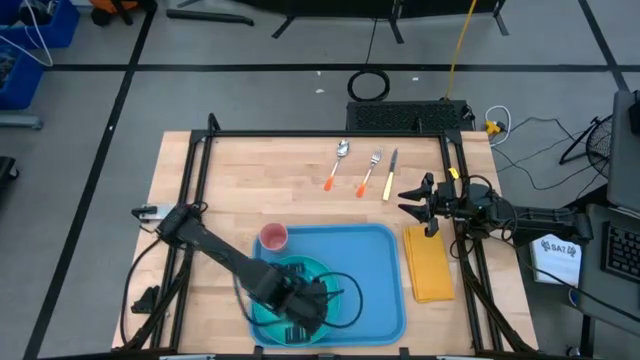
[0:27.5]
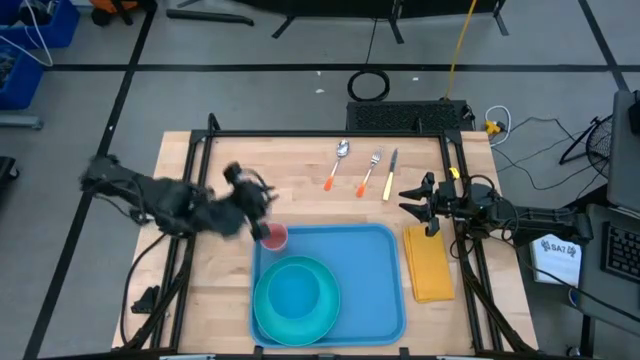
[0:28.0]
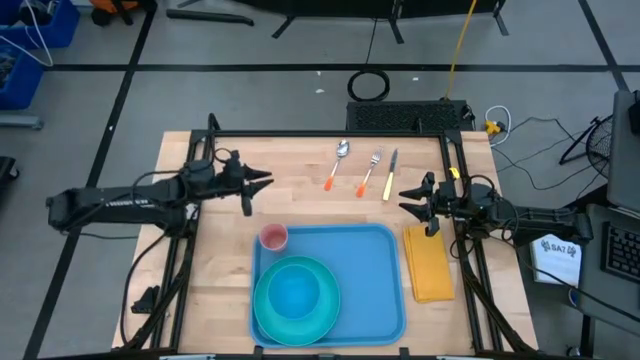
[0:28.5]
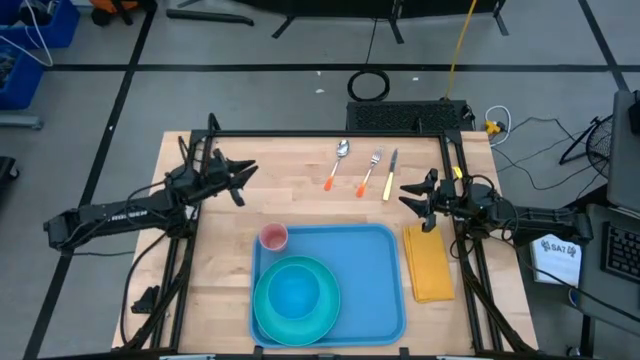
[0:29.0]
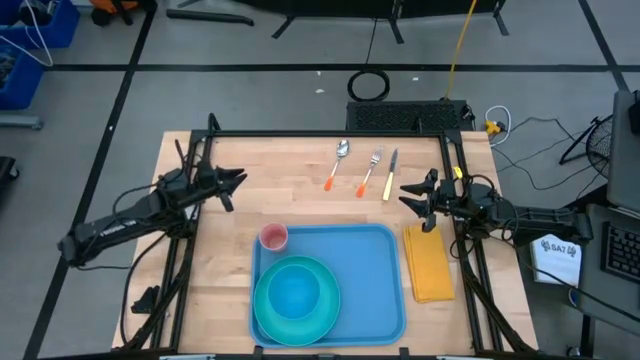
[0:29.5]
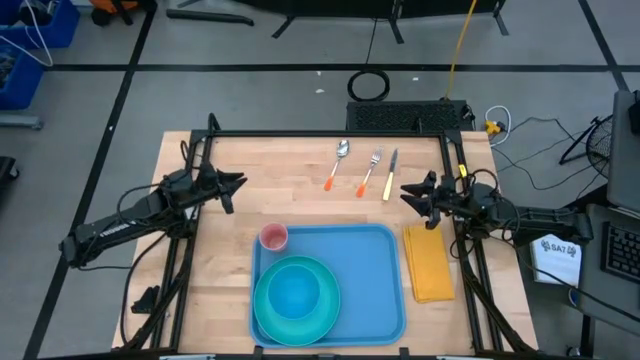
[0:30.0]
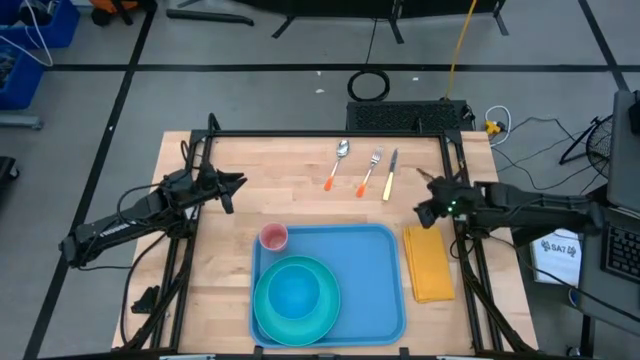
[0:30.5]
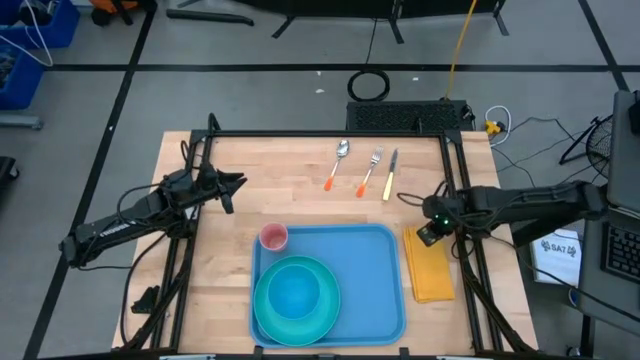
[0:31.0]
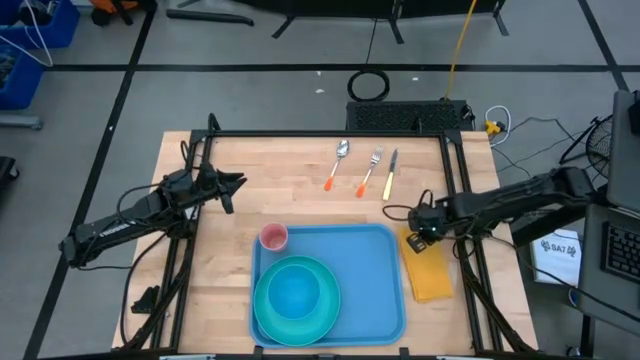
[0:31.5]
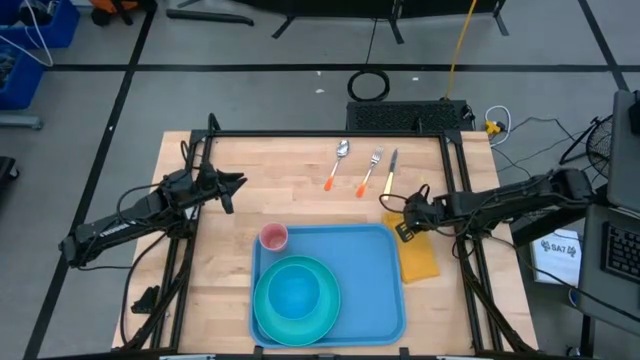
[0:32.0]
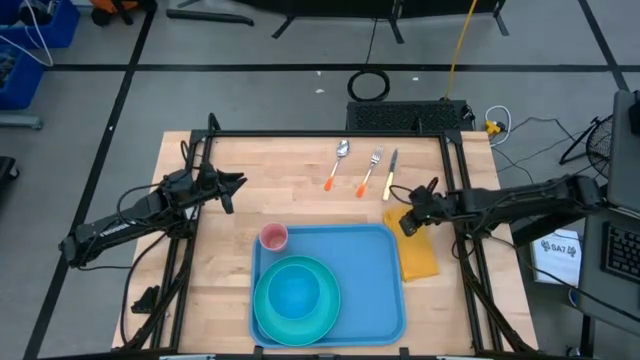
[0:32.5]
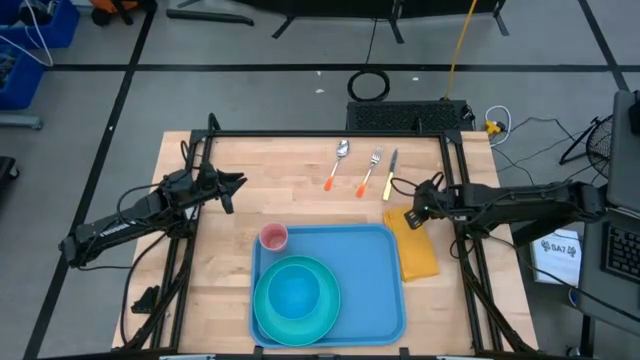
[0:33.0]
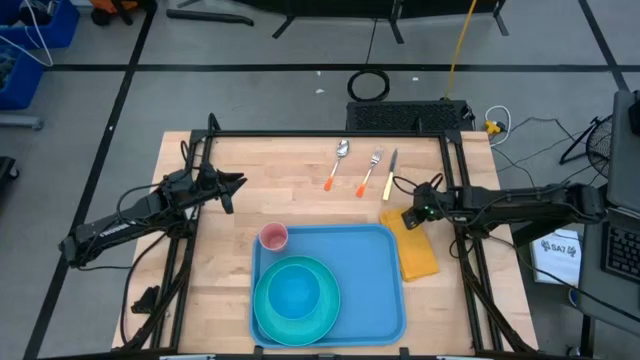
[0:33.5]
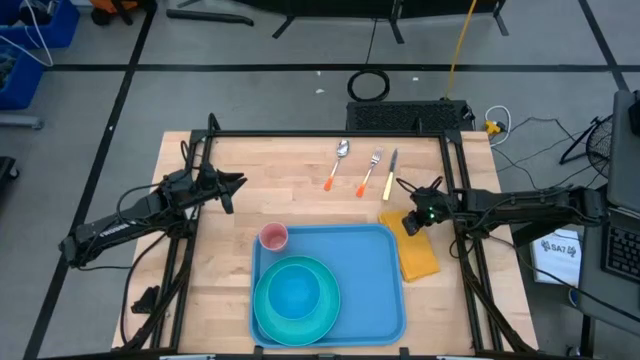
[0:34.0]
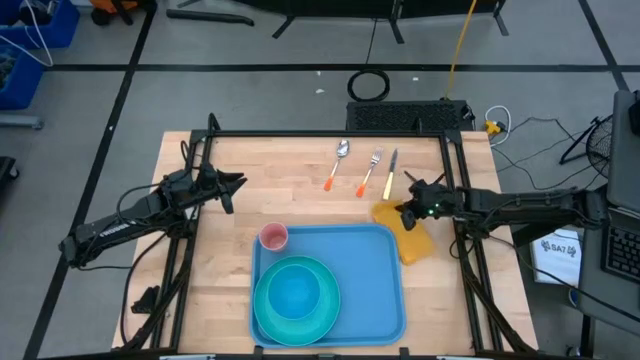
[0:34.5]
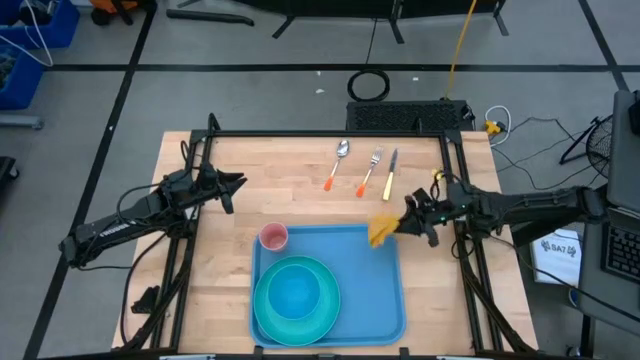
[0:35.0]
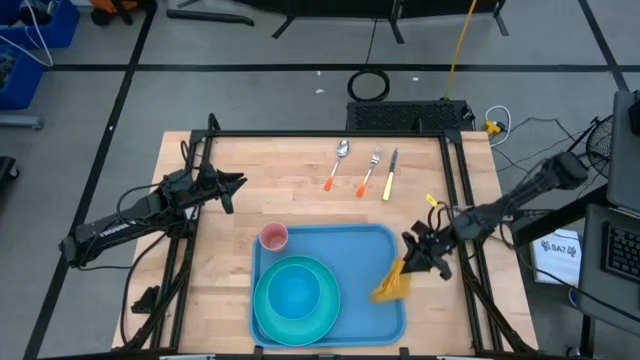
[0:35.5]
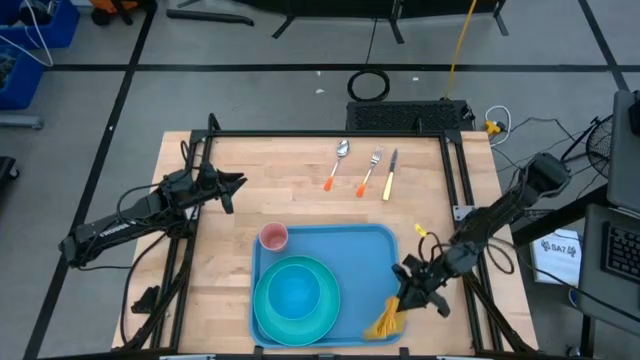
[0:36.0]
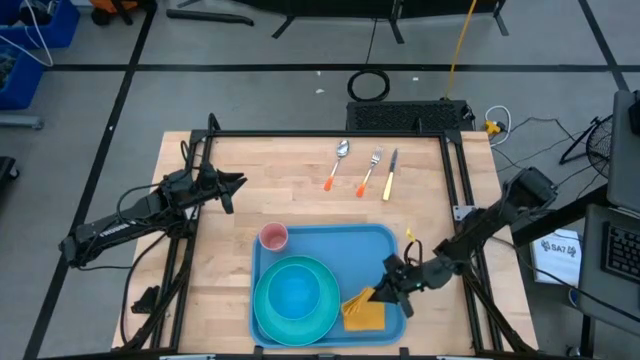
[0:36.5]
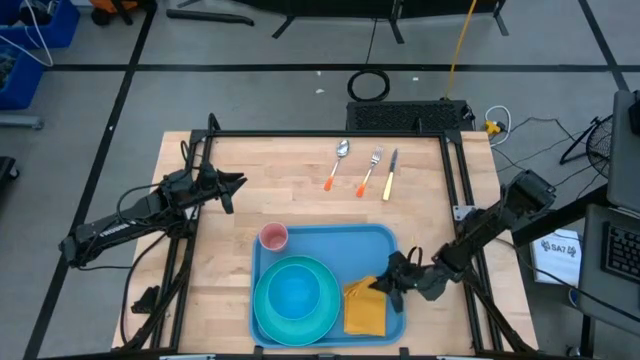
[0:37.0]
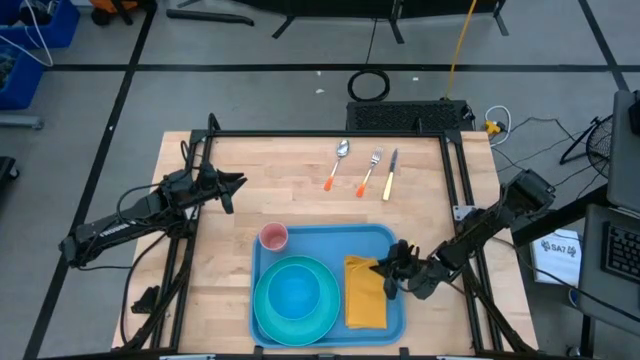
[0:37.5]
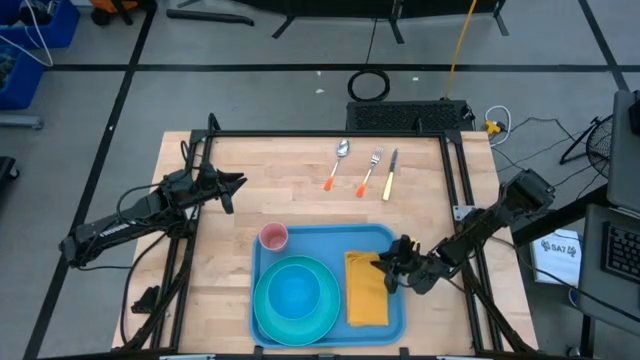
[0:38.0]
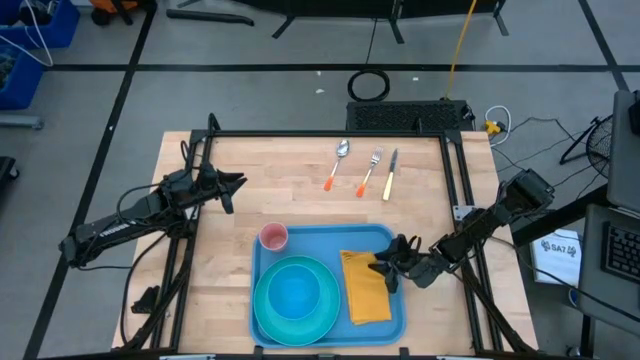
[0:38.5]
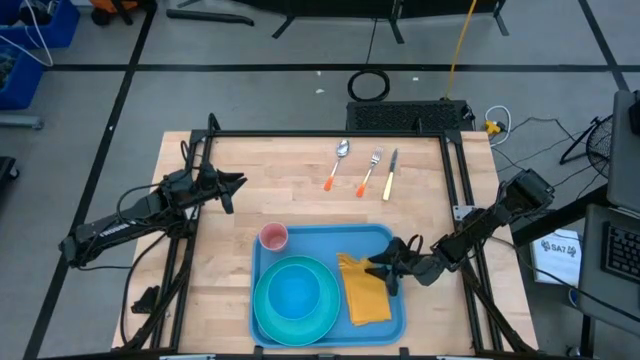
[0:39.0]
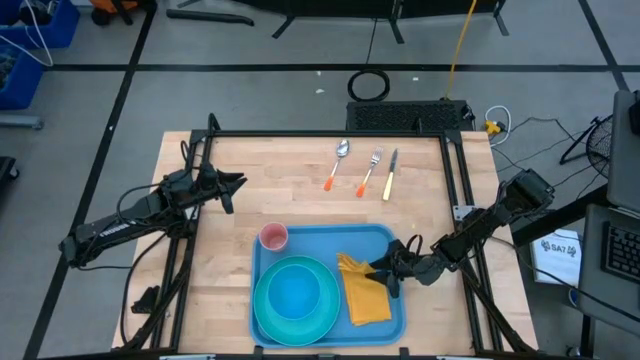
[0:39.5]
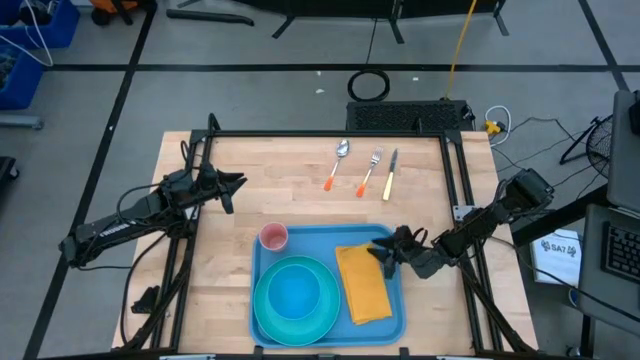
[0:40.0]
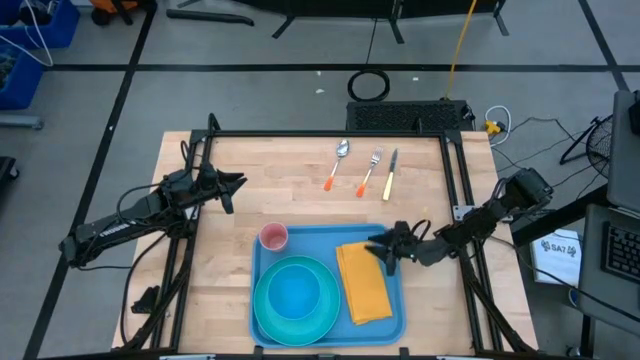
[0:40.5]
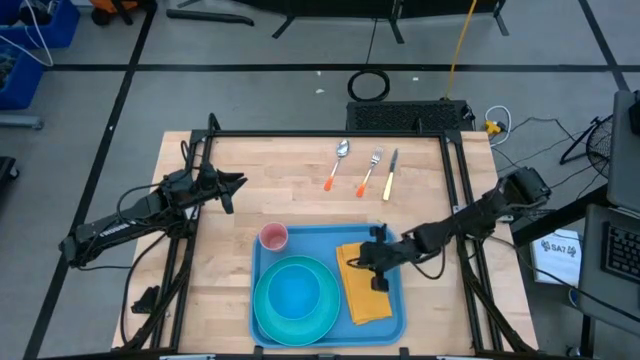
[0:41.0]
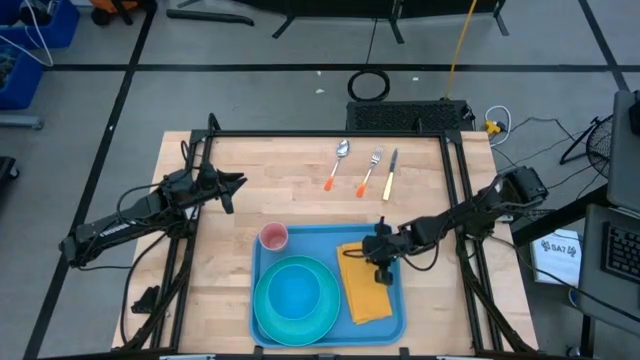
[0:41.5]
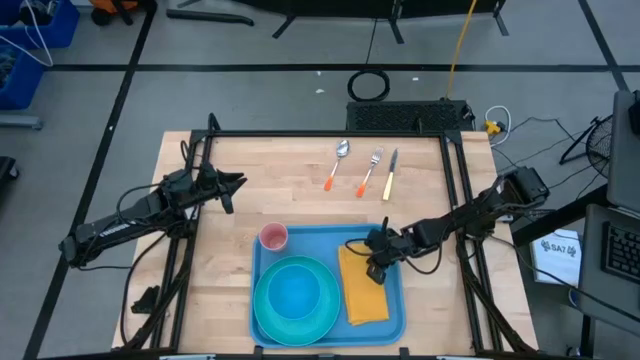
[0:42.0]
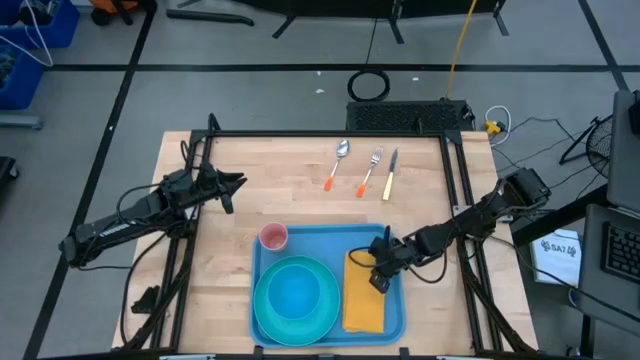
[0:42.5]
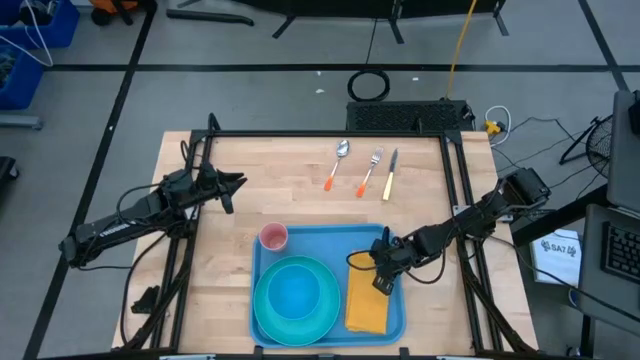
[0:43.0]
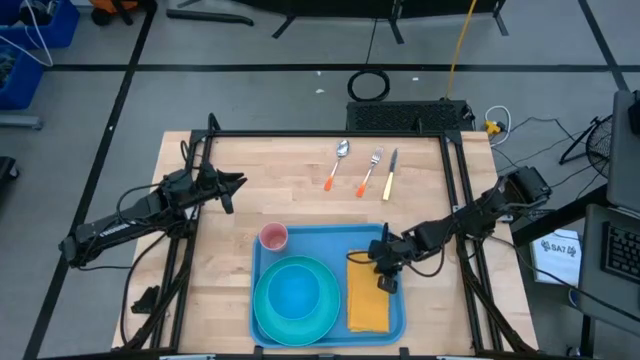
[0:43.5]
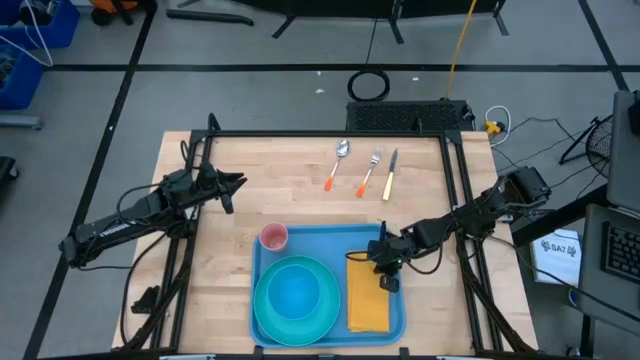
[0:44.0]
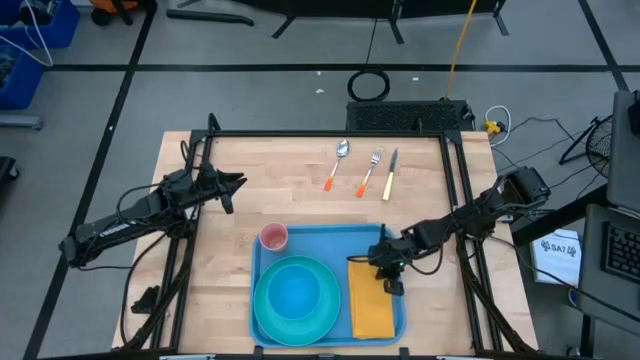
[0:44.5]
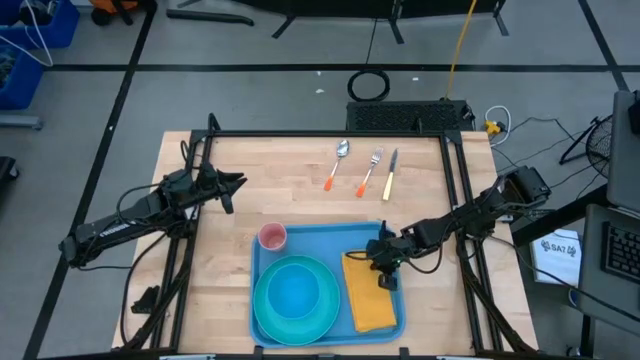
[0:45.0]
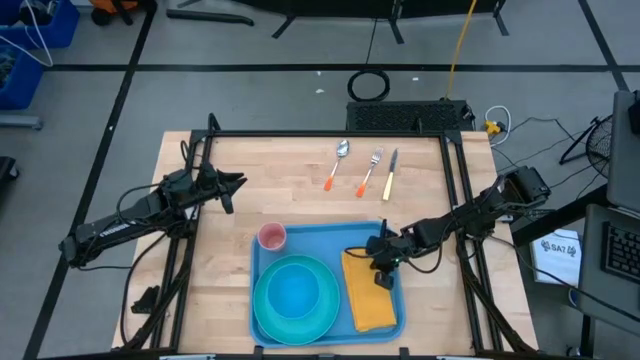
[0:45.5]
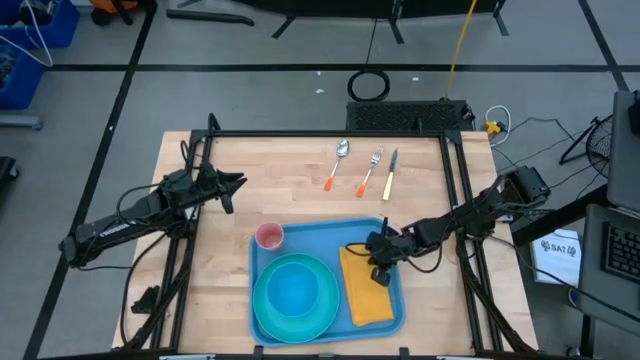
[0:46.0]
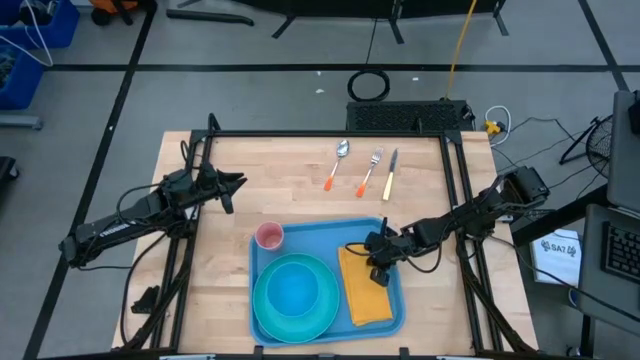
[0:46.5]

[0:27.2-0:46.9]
Task: Set up tray
Put the yellow napkin on the blue tray to the right of the blue plate

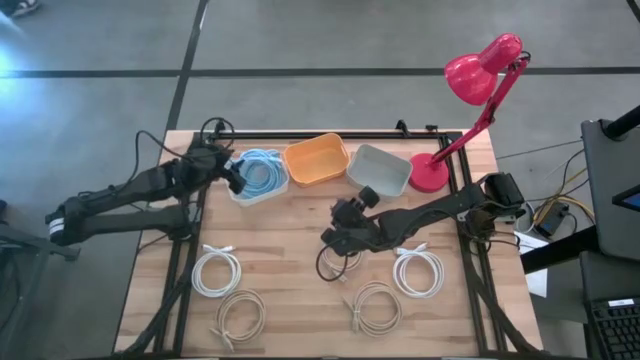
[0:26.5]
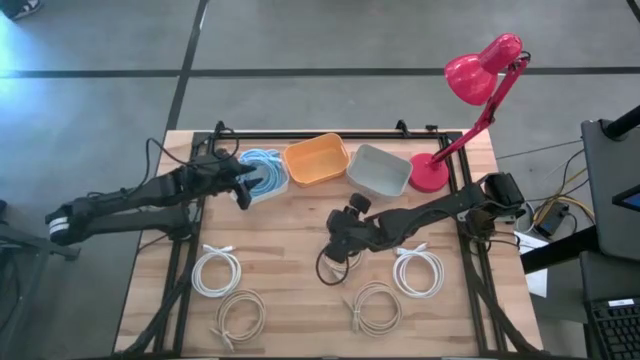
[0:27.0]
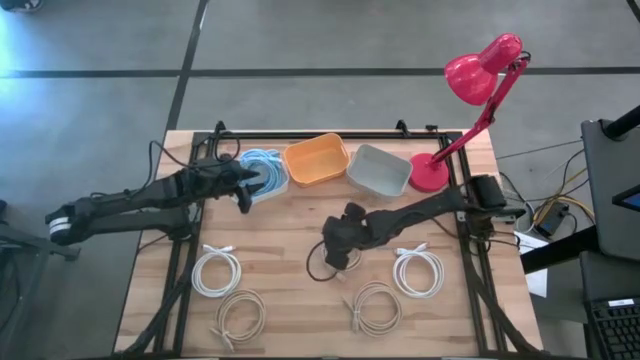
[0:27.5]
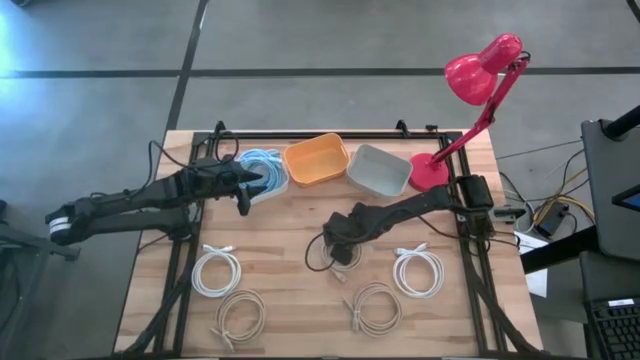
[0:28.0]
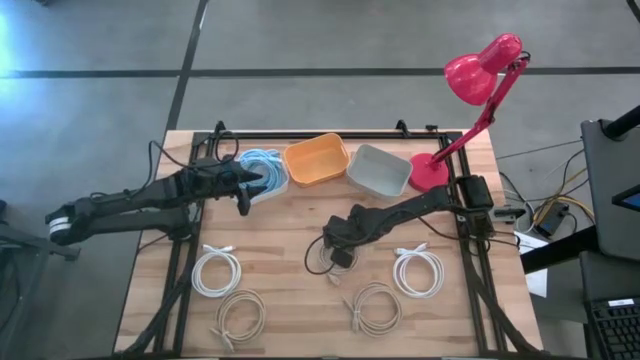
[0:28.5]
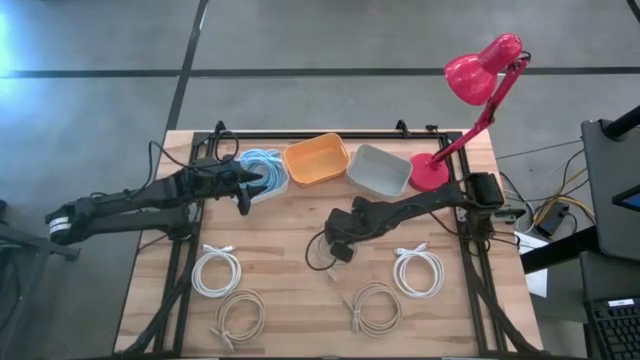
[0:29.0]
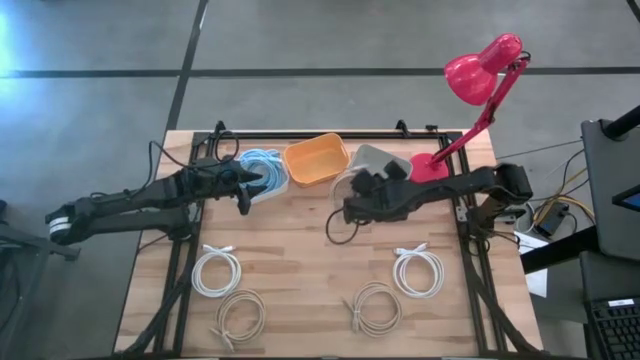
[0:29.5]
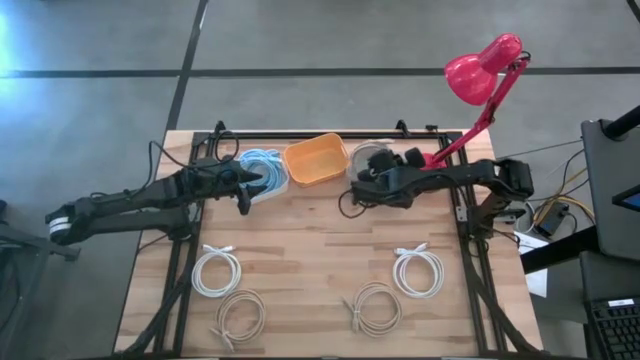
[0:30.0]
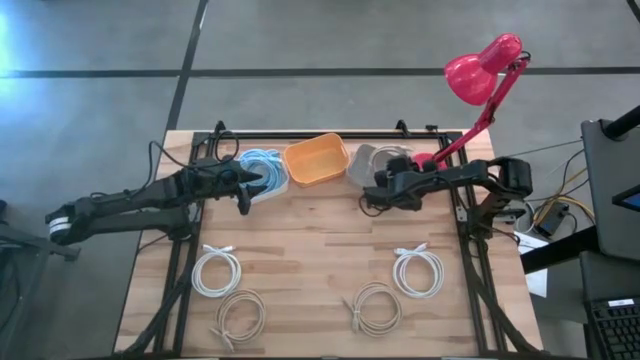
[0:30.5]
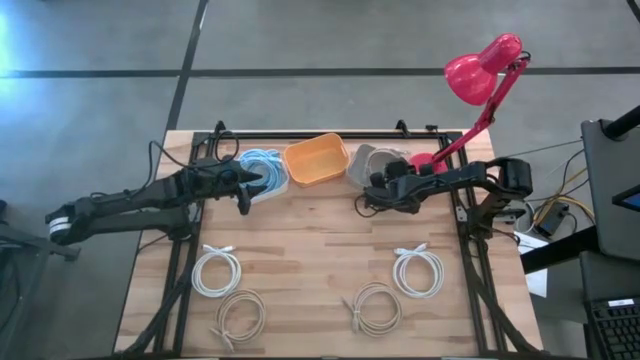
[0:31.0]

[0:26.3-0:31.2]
Task: Pick & Place USB Port
Put the top brown charger cable into the gray bin
